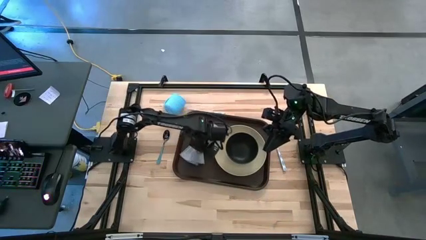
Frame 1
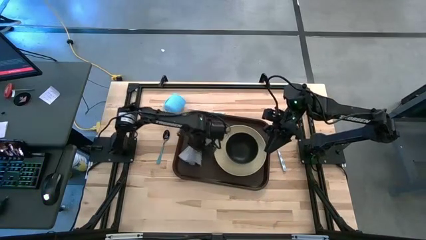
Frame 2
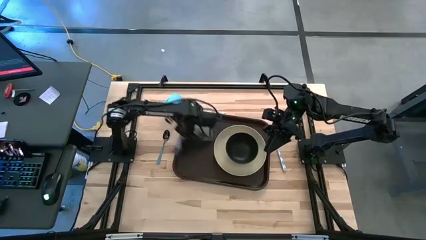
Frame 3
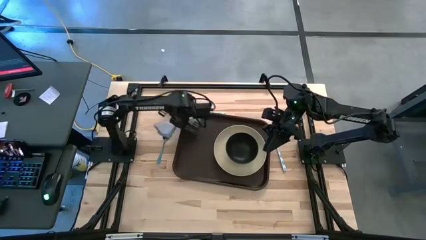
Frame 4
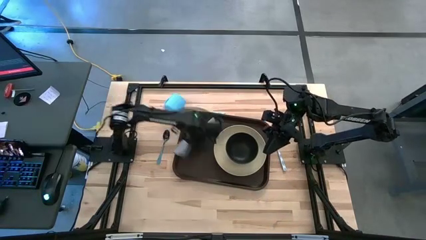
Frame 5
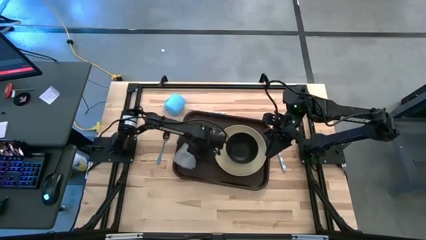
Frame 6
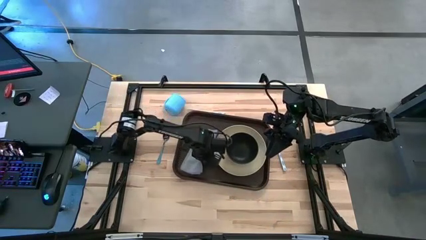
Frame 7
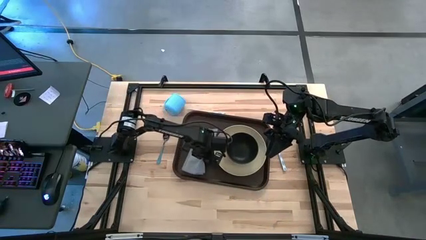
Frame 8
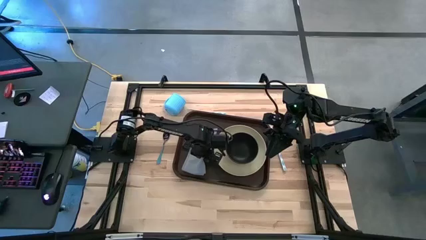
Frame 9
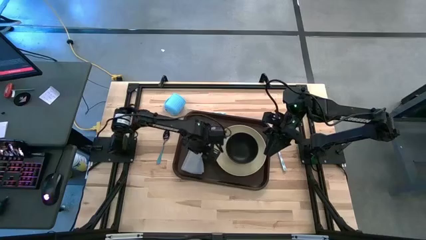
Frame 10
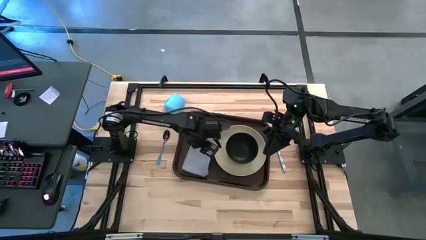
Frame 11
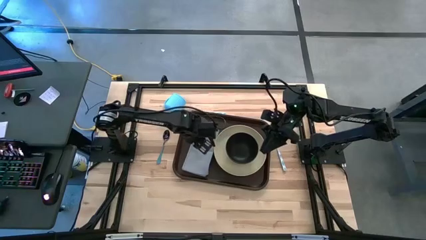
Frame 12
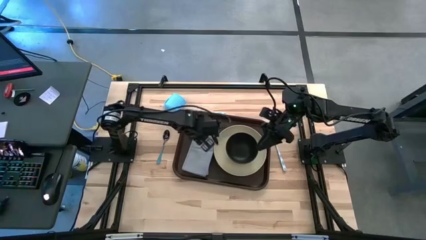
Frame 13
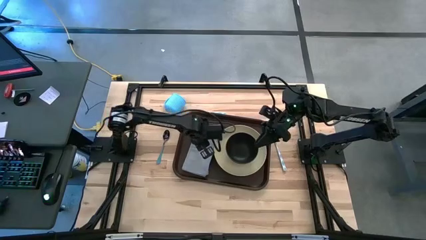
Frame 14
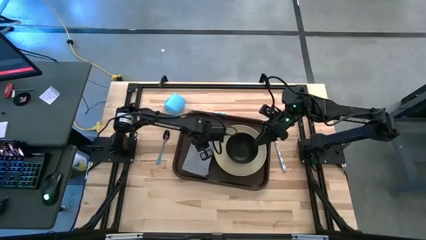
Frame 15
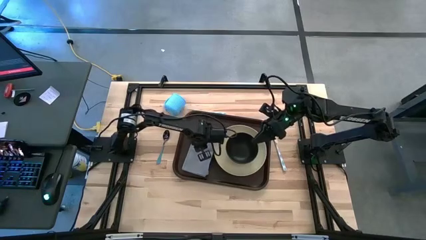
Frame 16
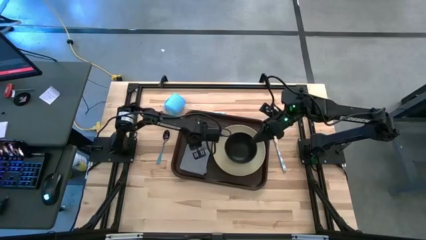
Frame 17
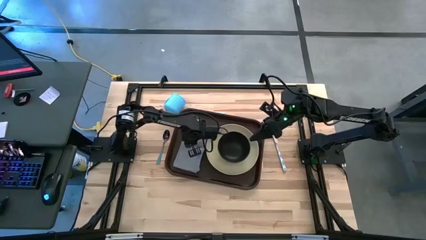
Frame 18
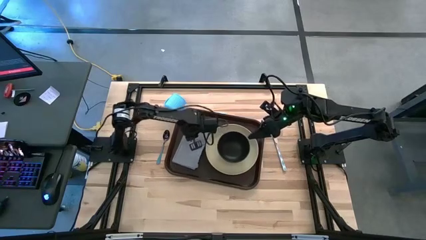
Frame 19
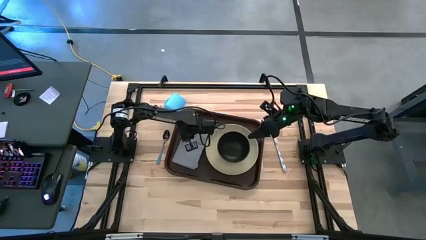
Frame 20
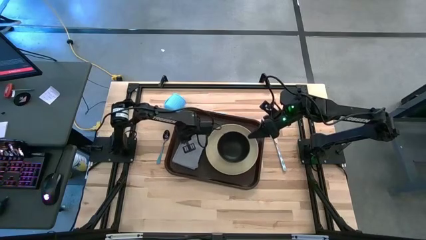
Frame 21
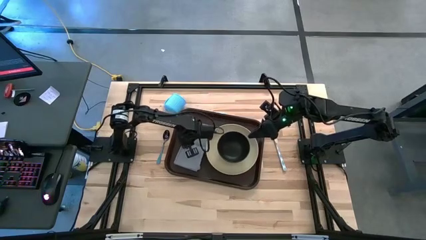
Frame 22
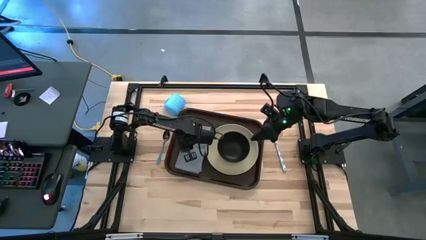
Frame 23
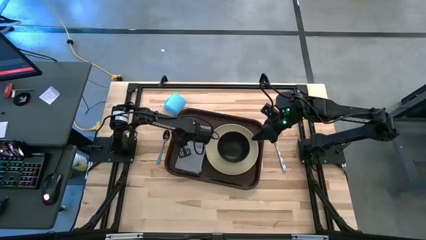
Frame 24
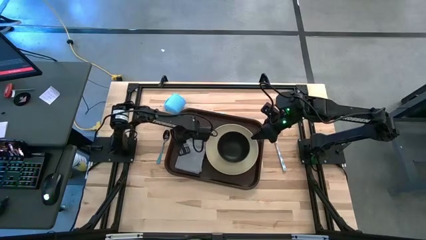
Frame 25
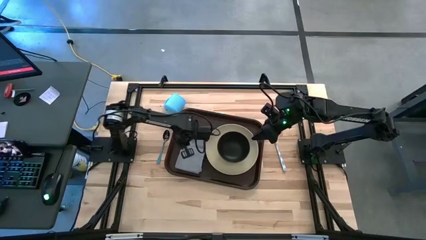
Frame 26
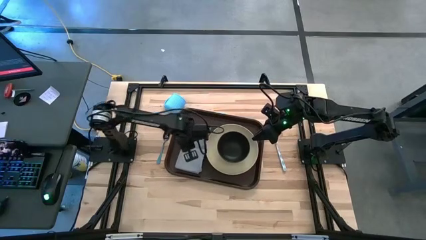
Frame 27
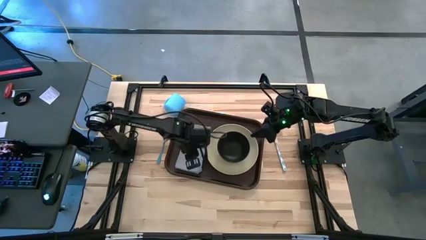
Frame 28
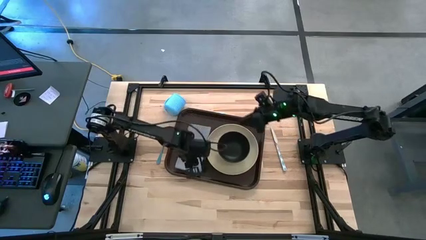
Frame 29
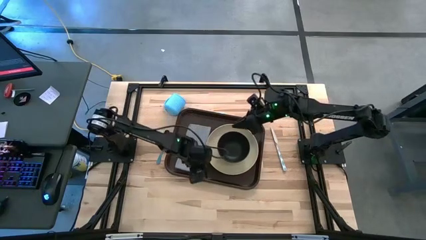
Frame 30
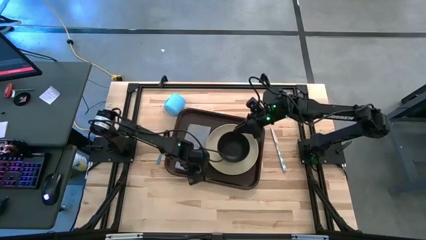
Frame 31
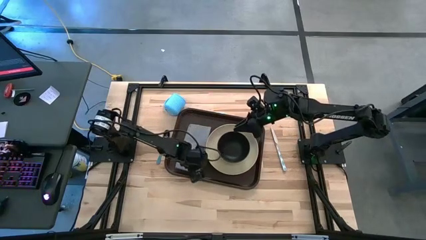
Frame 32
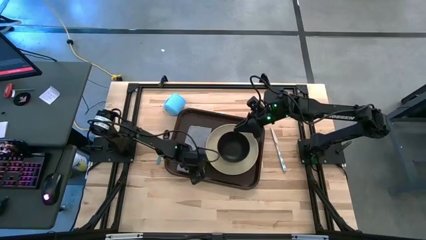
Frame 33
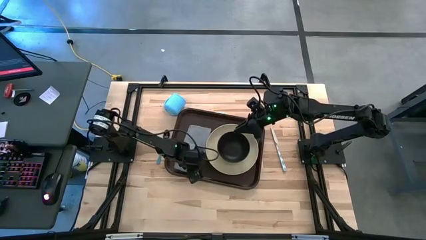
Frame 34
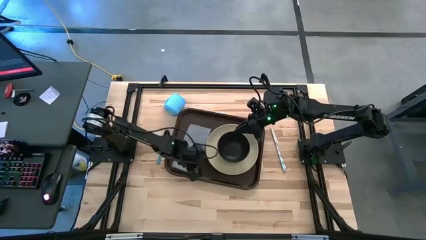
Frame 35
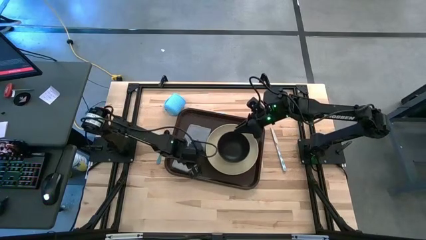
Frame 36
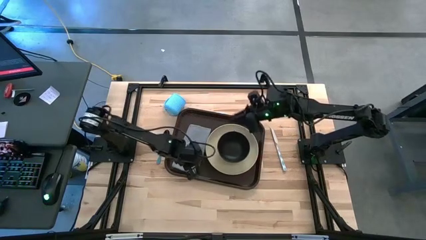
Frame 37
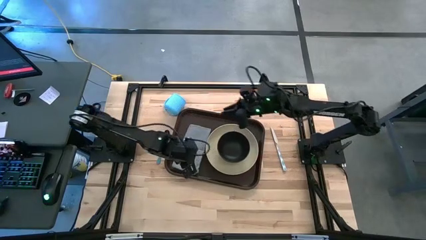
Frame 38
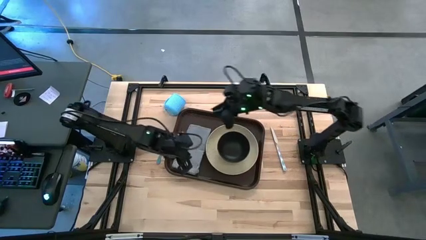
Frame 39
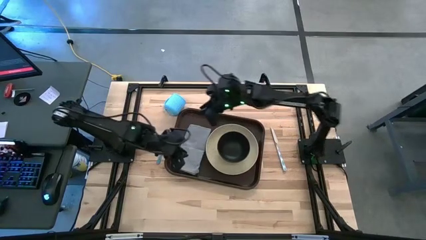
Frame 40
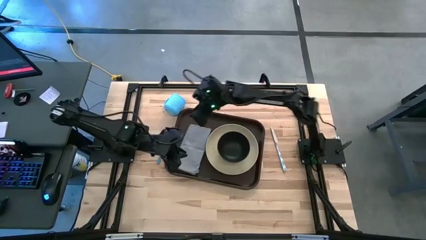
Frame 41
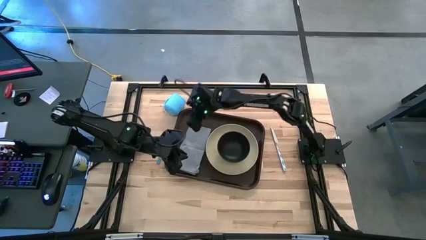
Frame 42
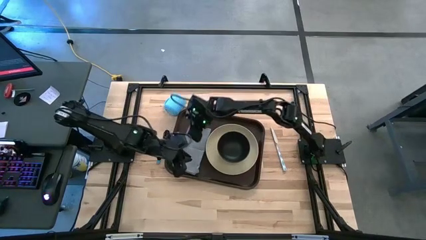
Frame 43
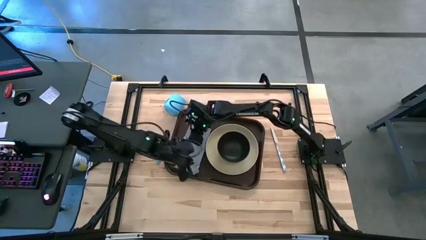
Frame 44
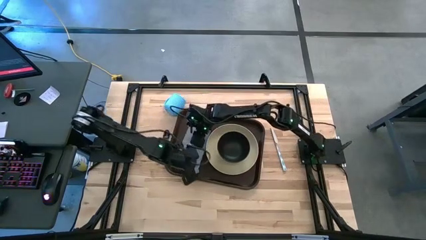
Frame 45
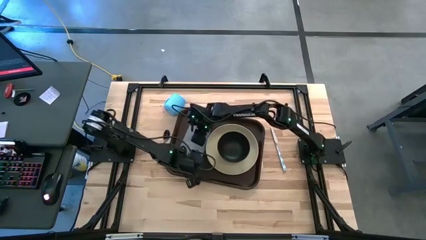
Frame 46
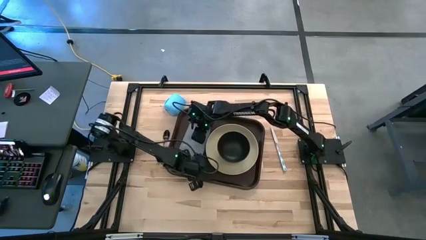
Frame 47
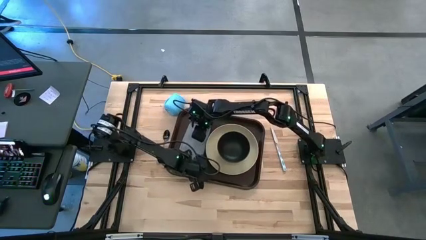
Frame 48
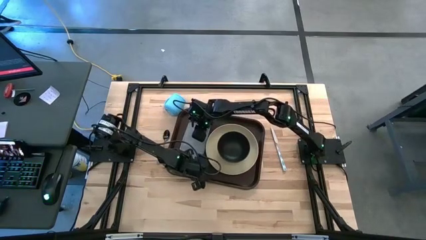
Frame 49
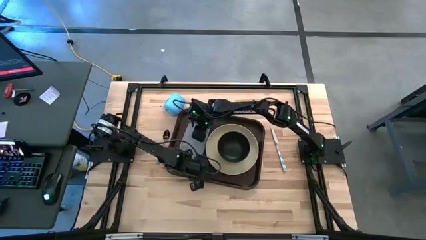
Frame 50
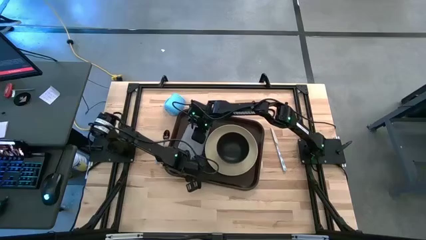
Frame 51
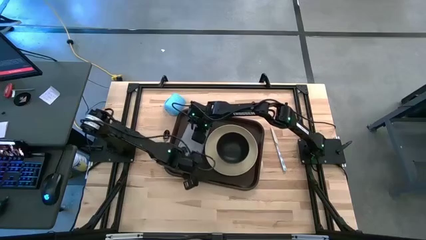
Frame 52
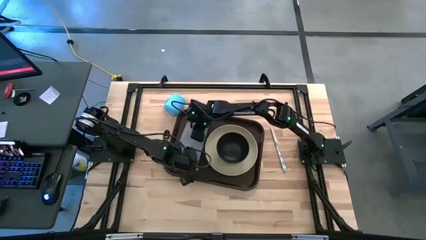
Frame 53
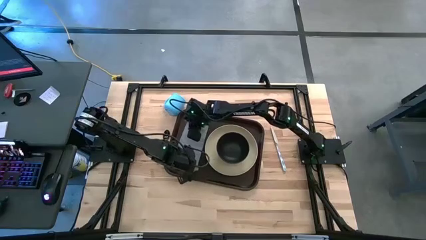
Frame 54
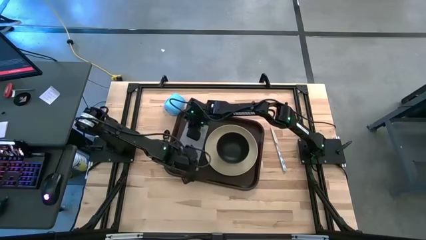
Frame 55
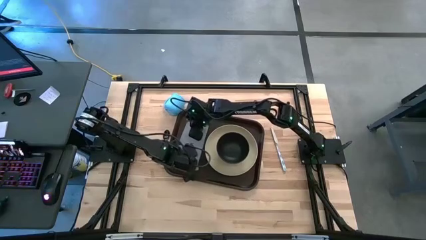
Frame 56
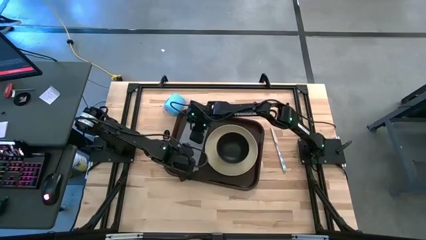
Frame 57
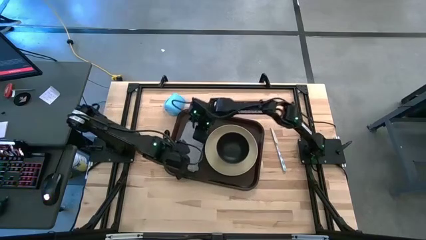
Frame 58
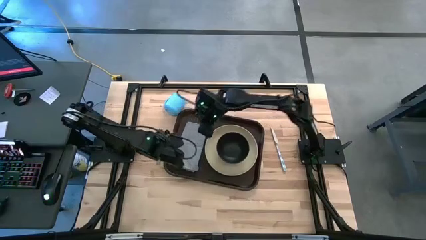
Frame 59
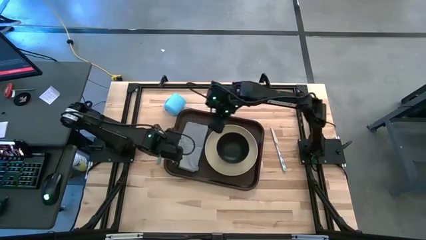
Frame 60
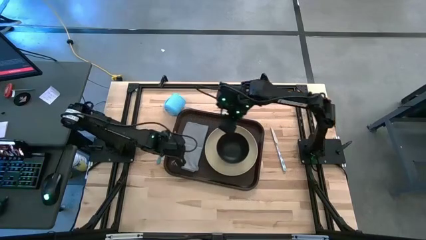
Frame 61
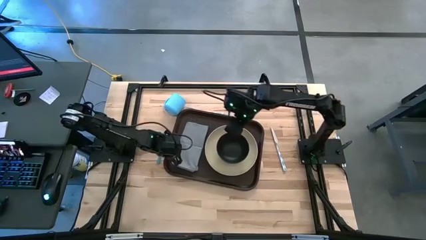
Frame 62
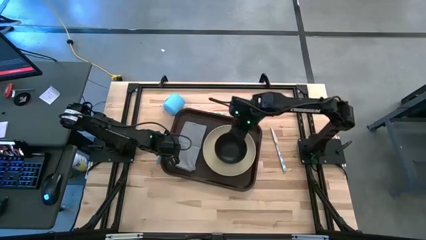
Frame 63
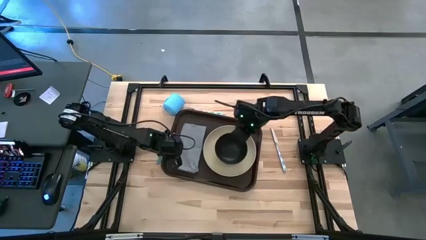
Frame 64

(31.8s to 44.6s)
Task: Set up tray
Put the gray napkin on the dark brown serving tray to the left of the brown plate

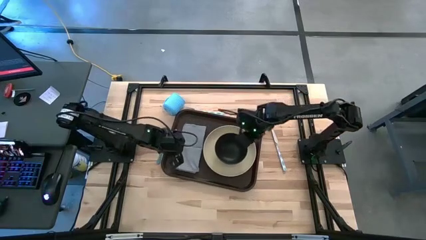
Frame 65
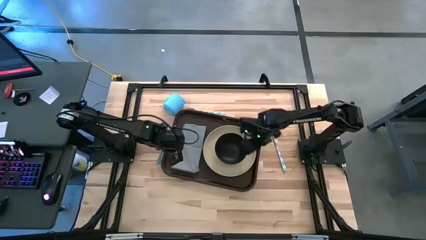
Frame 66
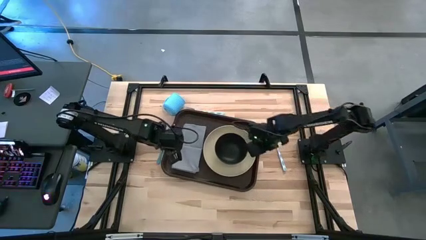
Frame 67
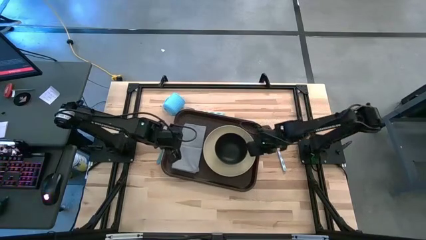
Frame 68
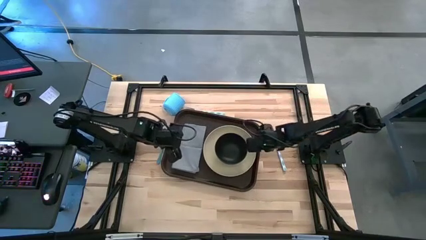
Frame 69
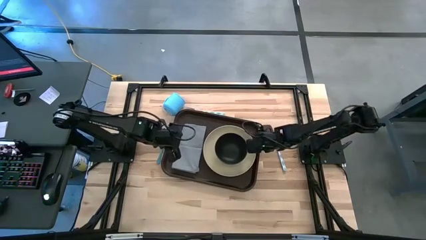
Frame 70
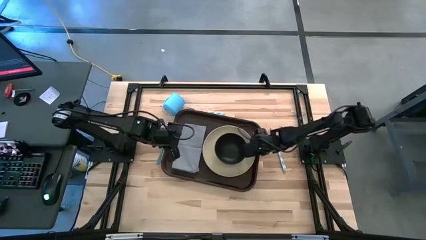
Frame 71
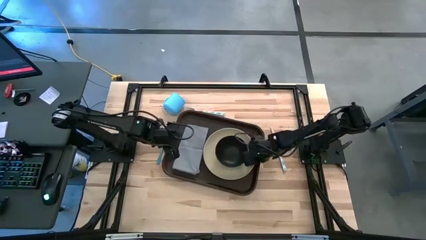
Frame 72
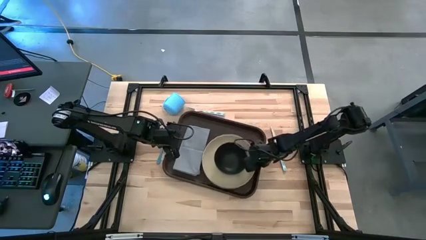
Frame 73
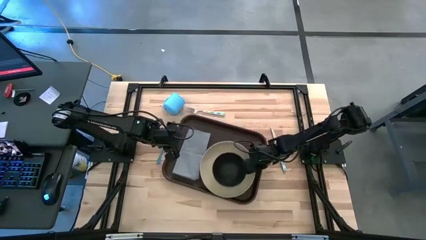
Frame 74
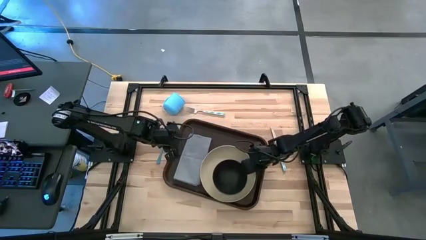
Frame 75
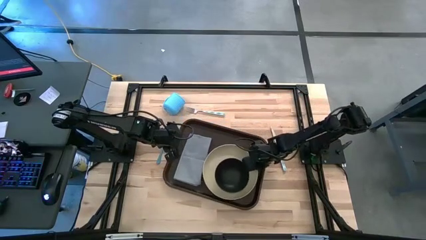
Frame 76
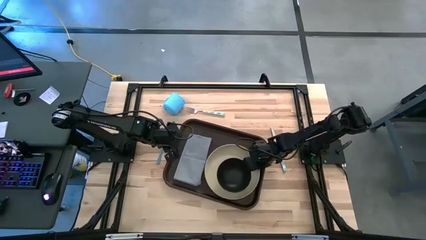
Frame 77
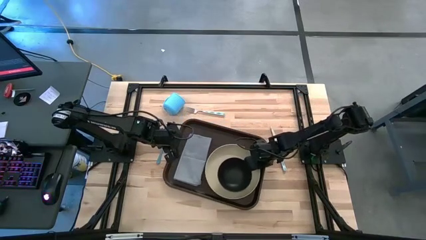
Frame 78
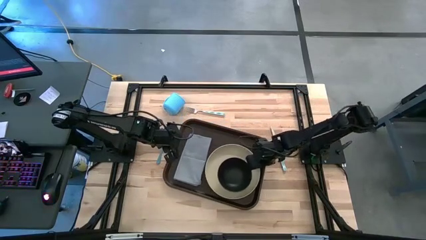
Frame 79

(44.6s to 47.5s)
Adjust the brown plate

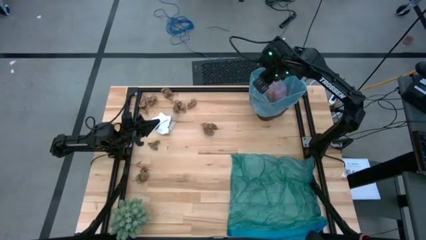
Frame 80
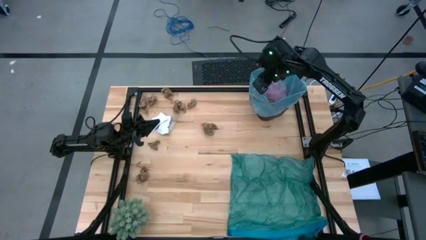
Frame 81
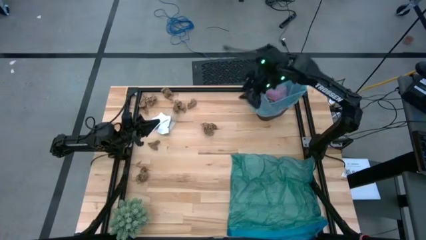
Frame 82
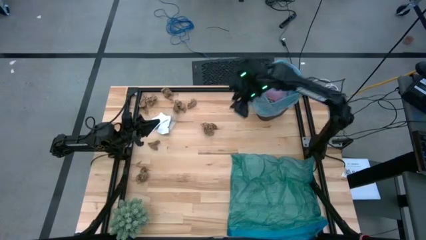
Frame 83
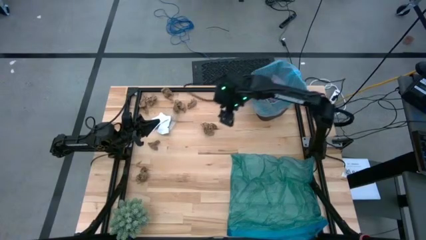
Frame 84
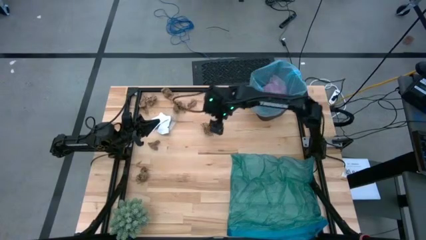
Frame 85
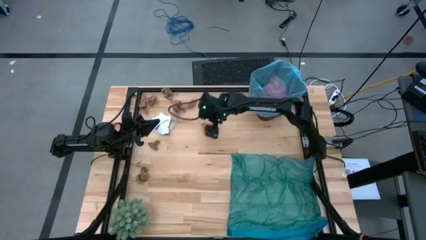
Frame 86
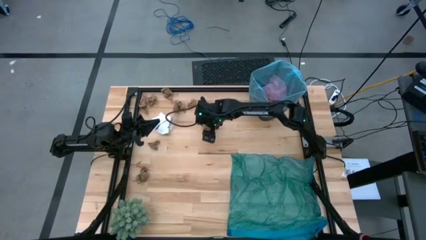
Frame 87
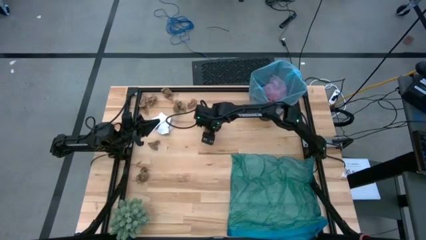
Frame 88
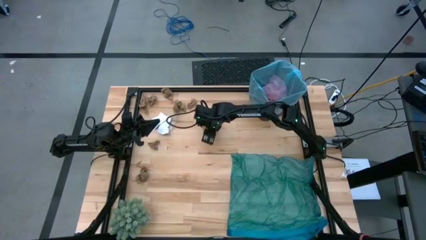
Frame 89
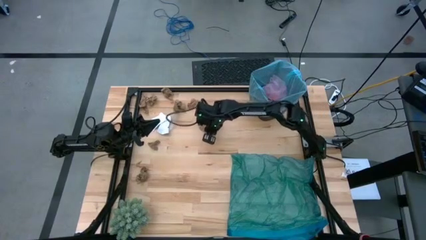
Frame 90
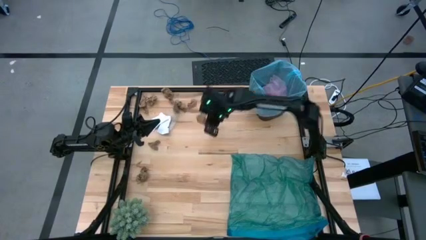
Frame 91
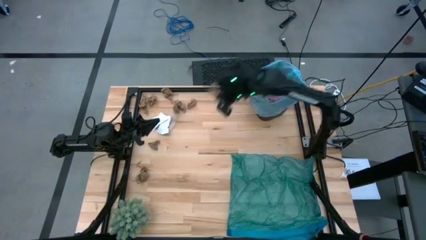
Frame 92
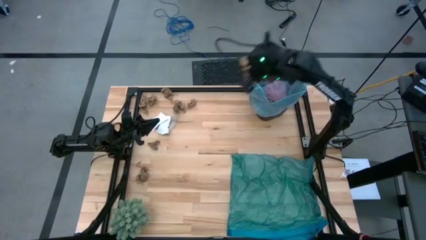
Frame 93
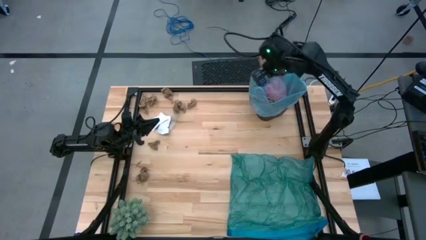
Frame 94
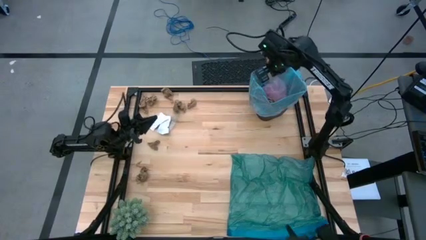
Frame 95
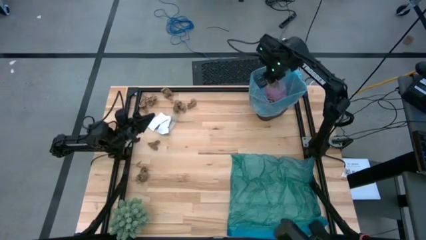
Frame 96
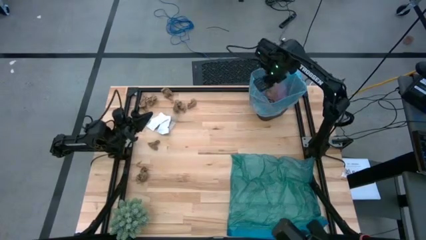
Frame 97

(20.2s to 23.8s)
Task: place trash/remove bag and relplace
Put the brown napkin into the black trash bin
